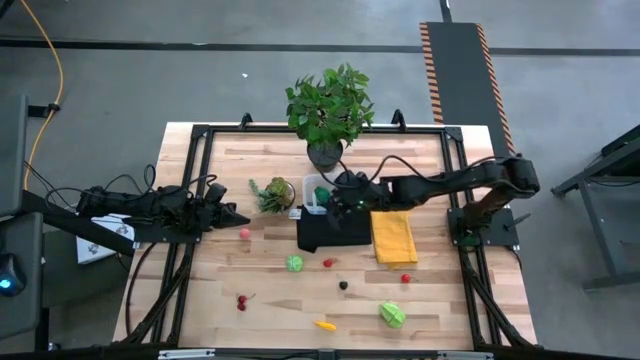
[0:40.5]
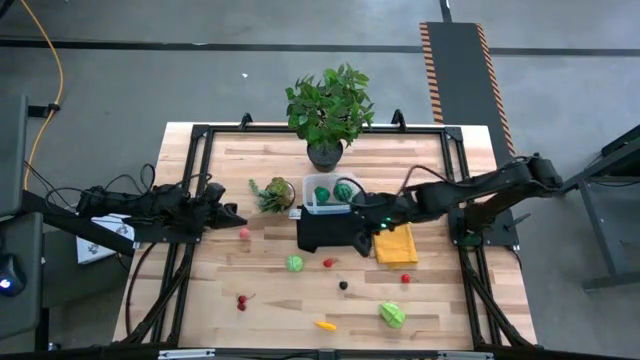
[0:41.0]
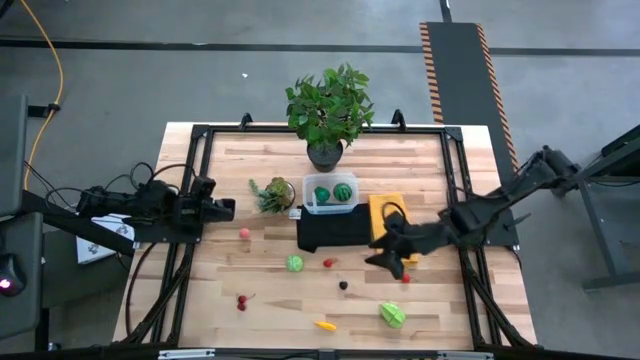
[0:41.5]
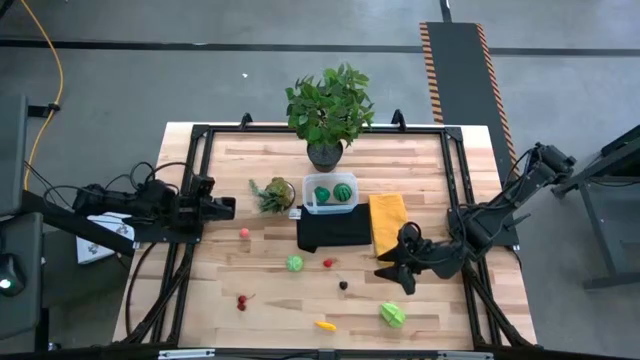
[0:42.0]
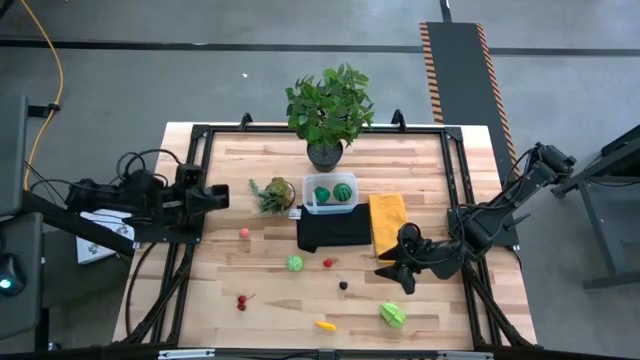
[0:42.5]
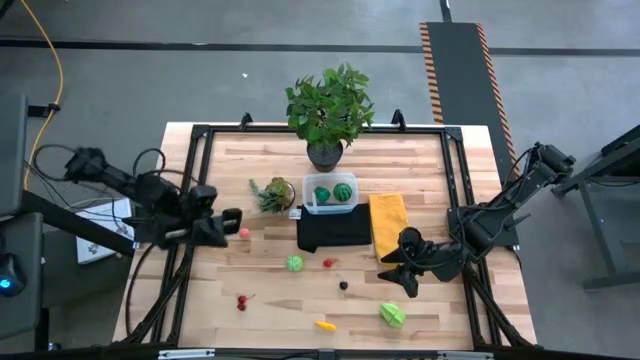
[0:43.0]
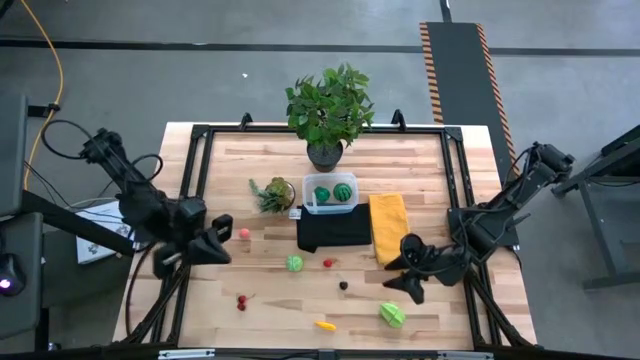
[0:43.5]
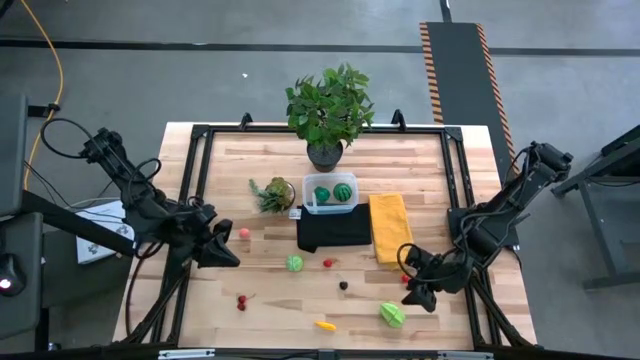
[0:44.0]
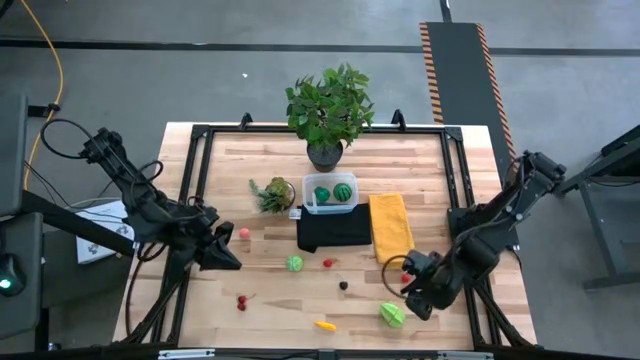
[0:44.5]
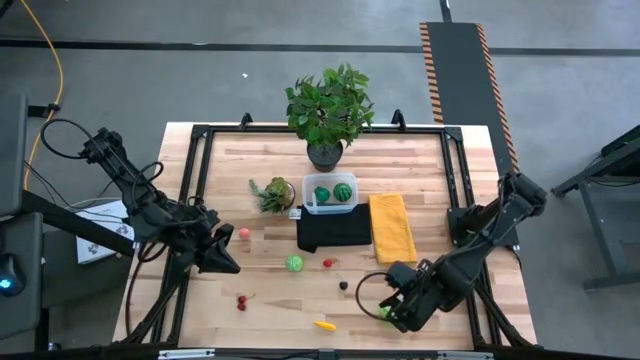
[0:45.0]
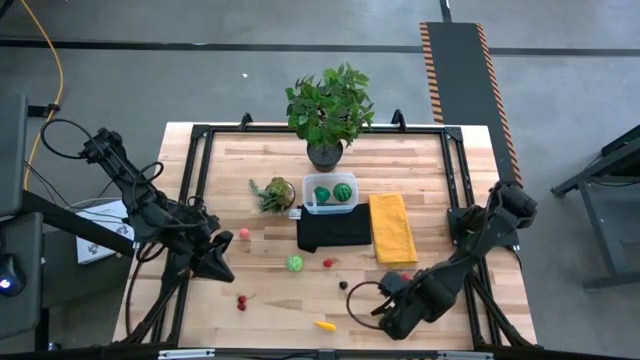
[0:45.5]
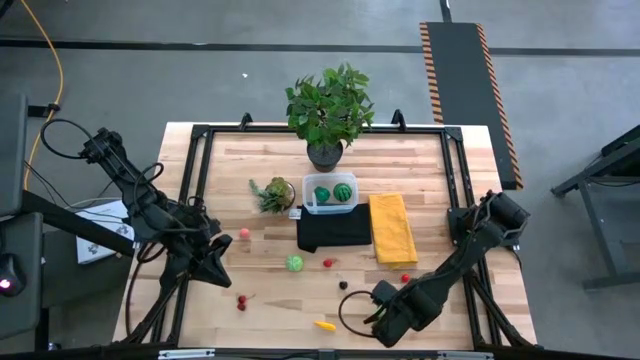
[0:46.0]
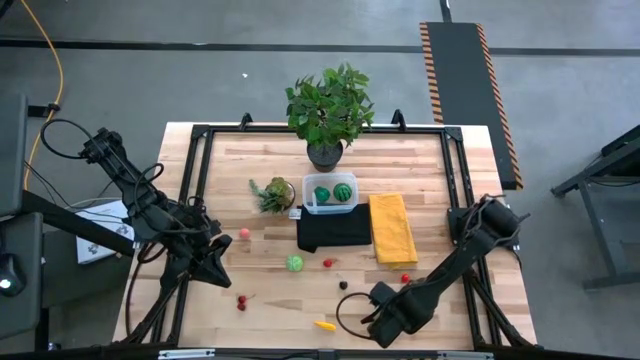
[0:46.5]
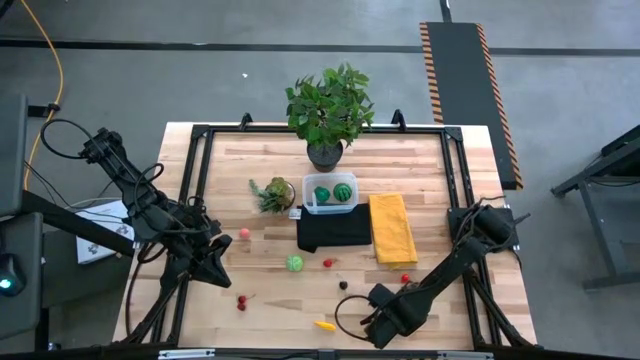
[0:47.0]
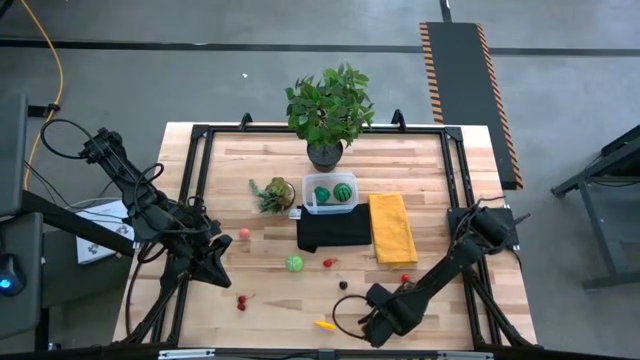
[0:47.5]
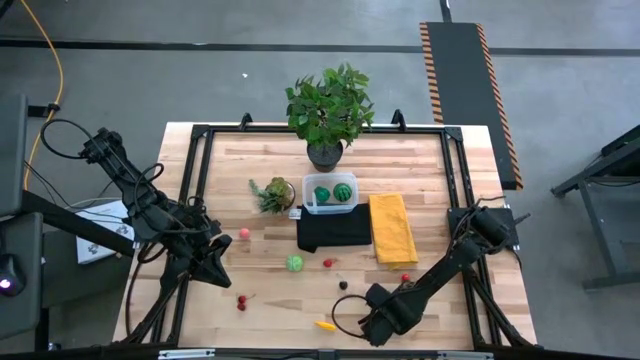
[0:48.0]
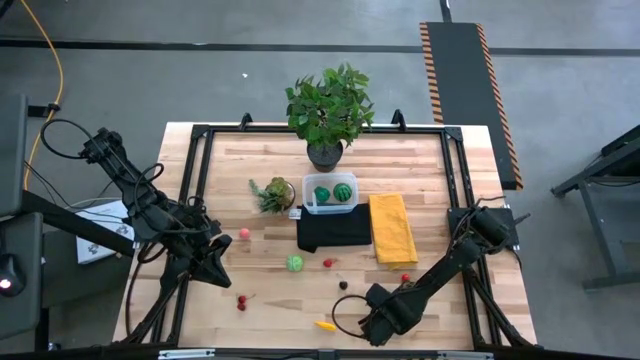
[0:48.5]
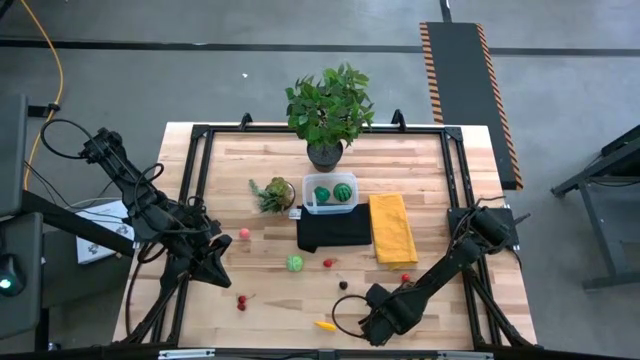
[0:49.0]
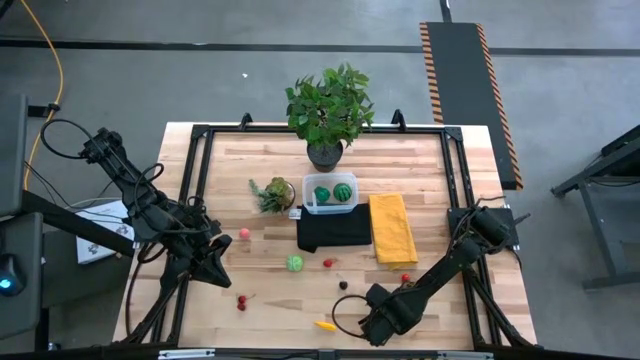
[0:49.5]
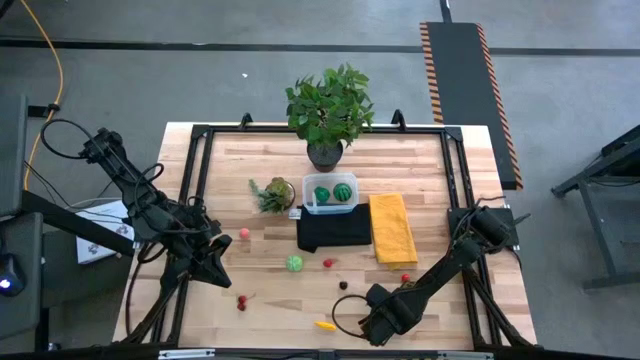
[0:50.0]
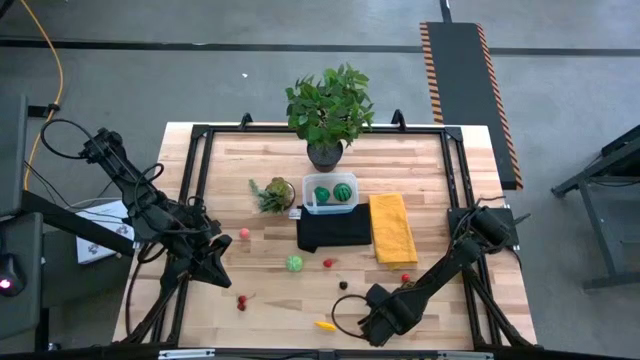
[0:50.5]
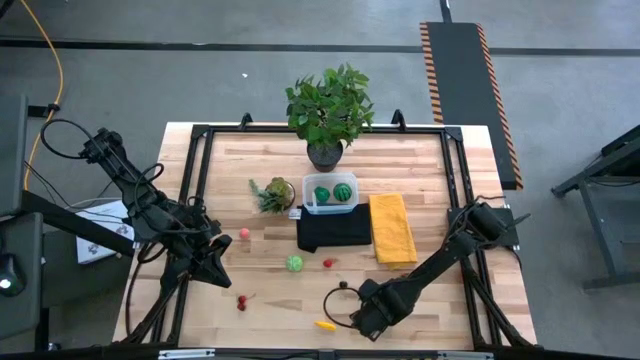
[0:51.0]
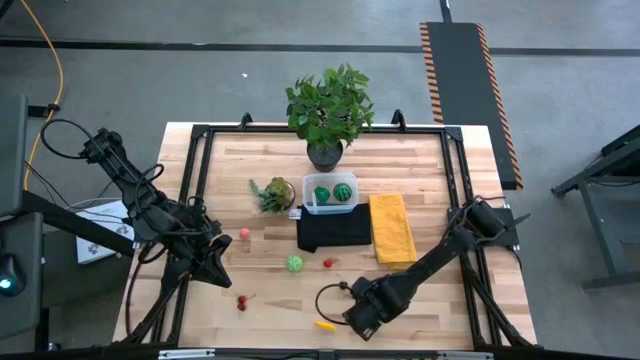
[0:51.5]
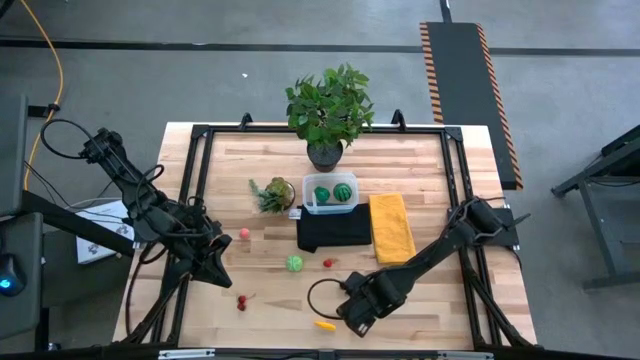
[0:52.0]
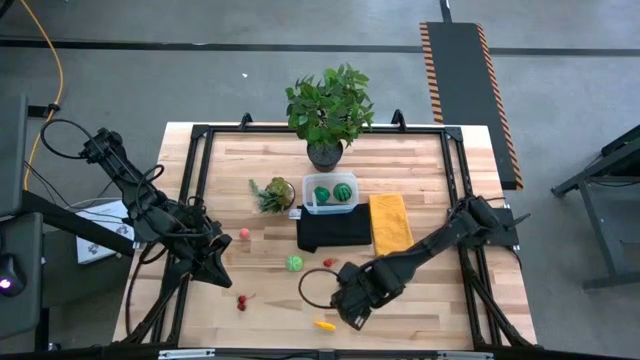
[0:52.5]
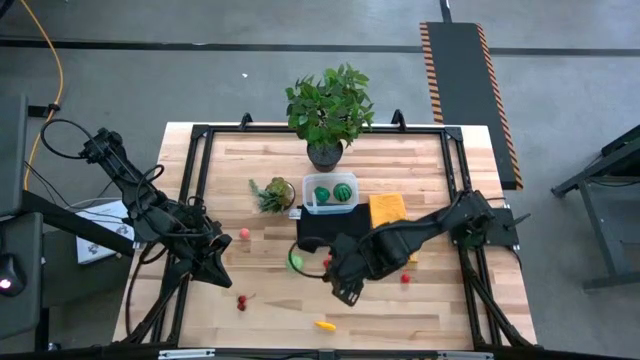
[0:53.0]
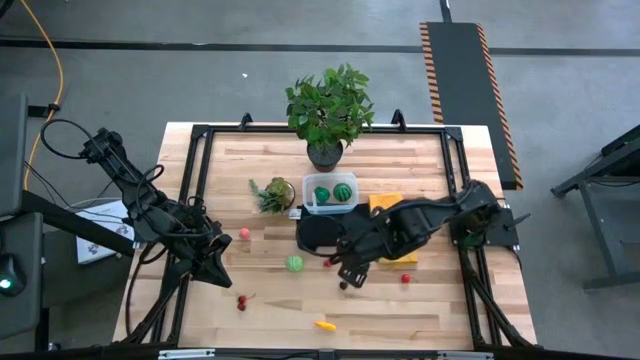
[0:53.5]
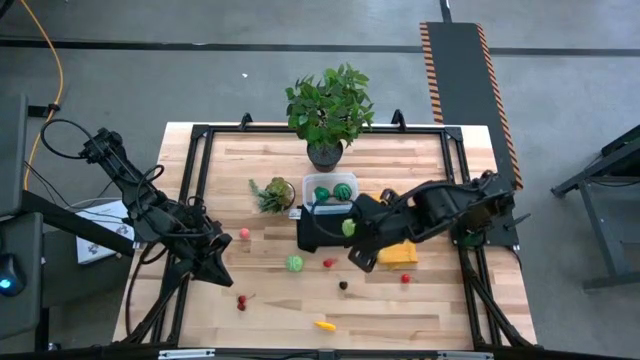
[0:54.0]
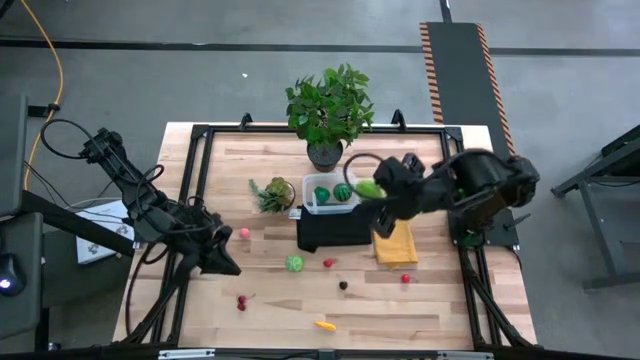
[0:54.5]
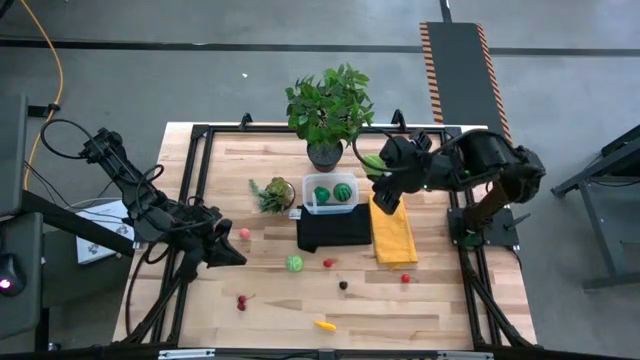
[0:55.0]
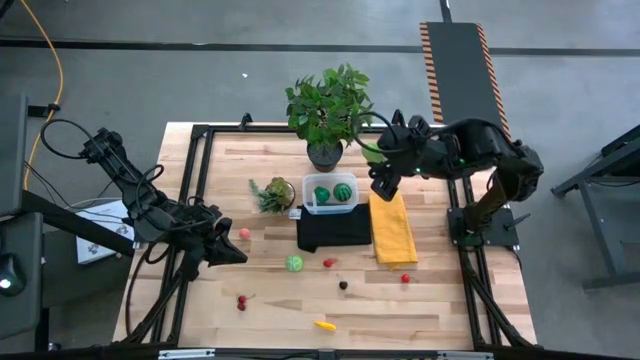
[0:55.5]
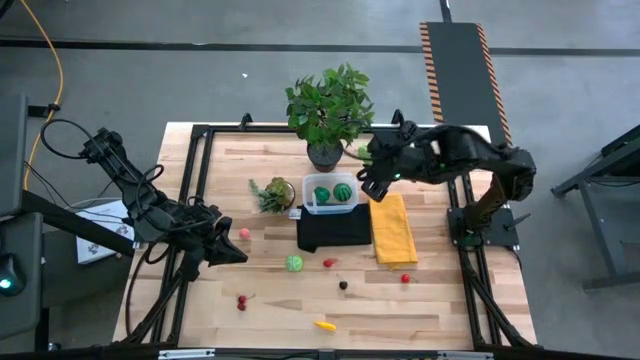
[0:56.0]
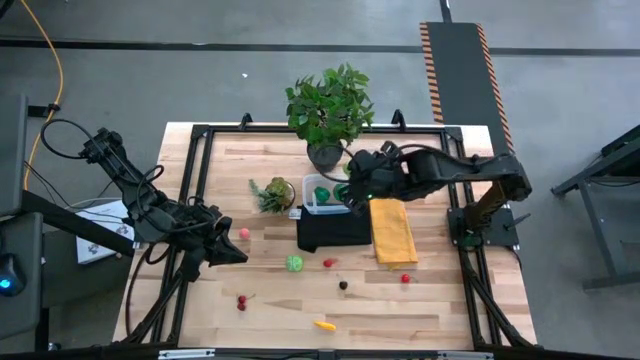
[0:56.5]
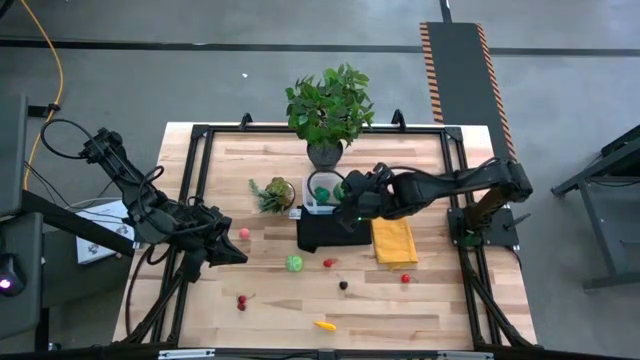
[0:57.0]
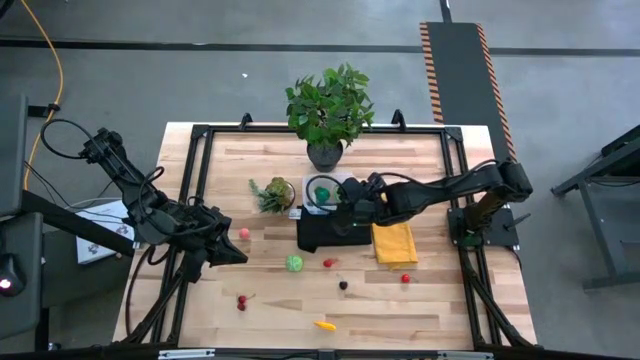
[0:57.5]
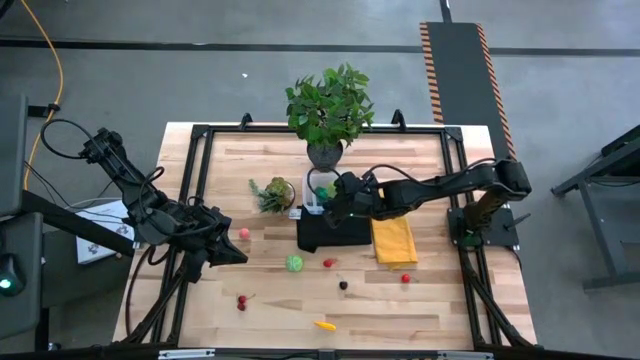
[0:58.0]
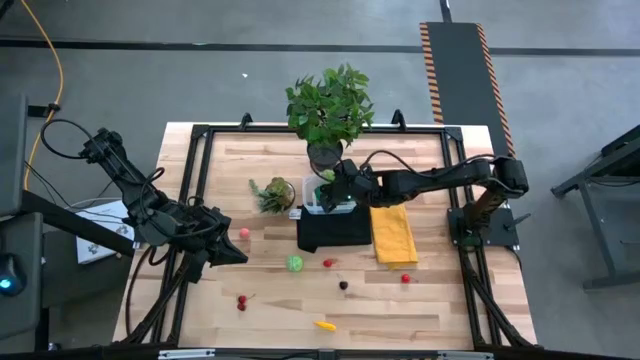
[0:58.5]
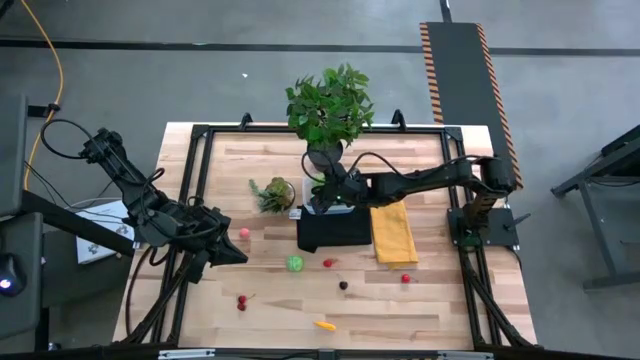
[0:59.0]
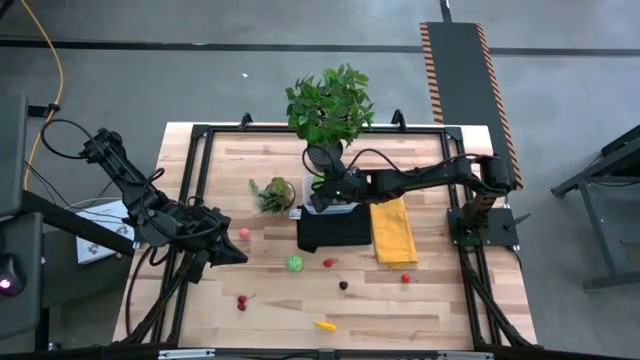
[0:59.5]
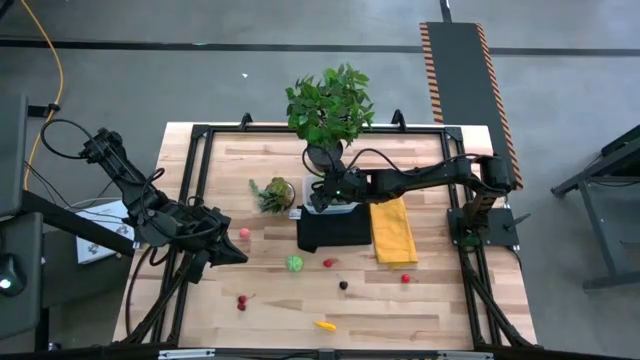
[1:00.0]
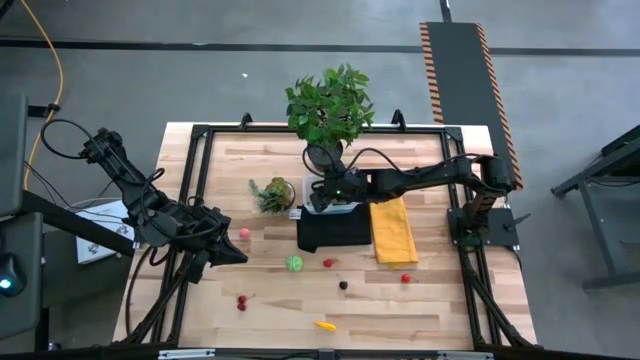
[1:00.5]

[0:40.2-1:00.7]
Task: Pick and placing Produce into tupperware
Put the starfruit into the transparent bin

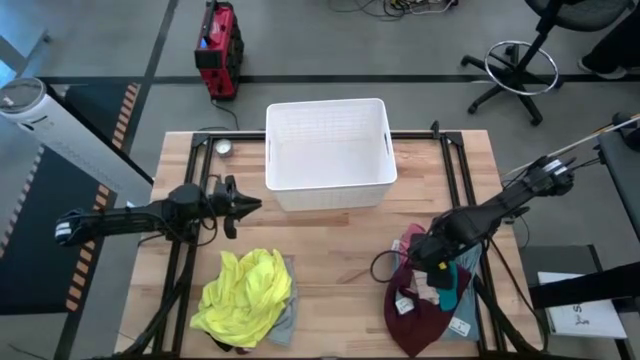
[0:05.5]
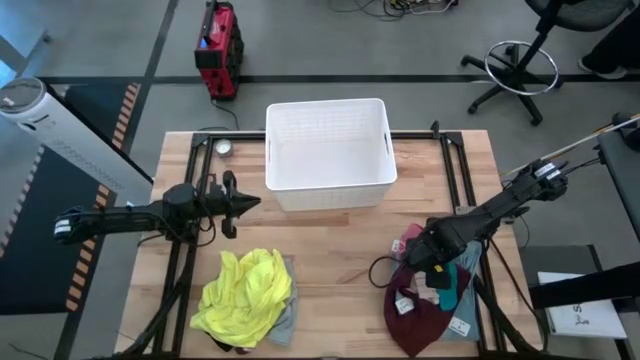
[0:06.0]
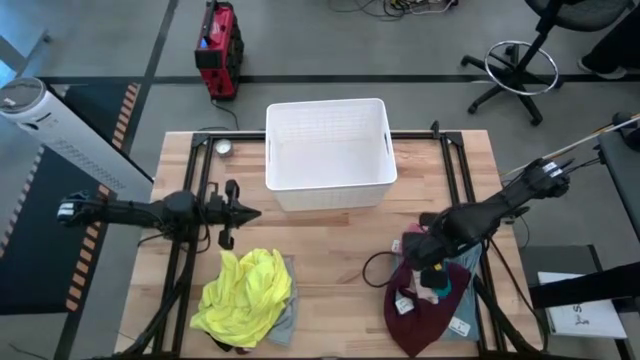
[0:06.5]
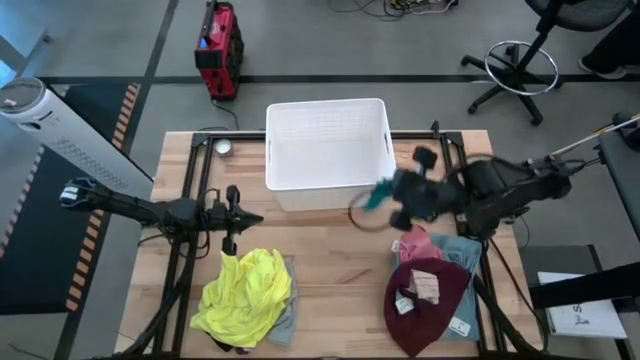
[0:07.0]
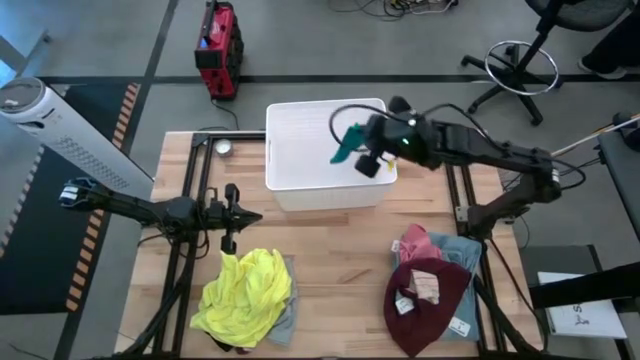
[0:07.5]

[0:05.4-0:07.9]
Task: Sort clothes
Put the blue sock into the white laundry bin
